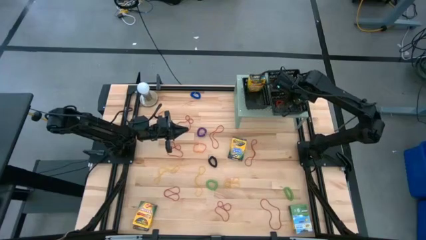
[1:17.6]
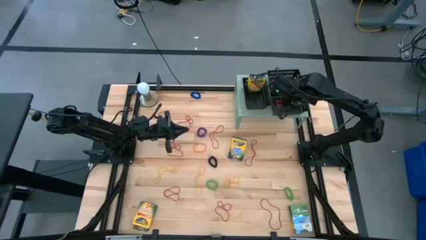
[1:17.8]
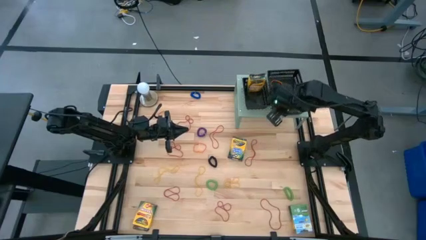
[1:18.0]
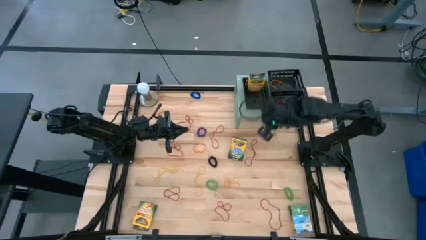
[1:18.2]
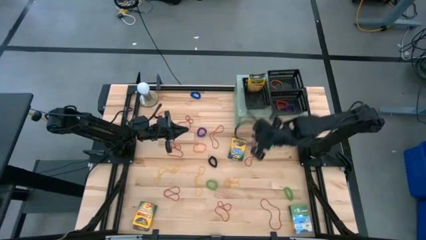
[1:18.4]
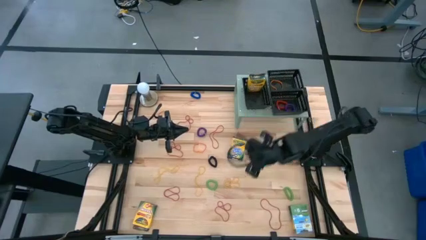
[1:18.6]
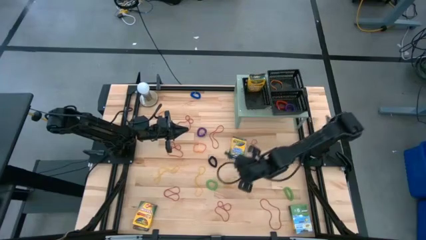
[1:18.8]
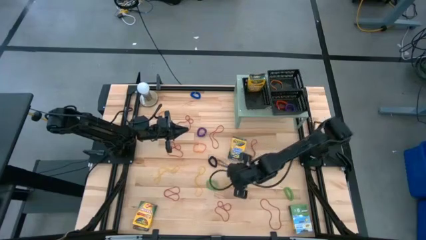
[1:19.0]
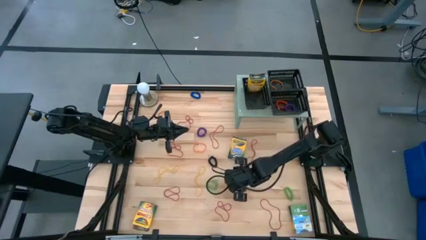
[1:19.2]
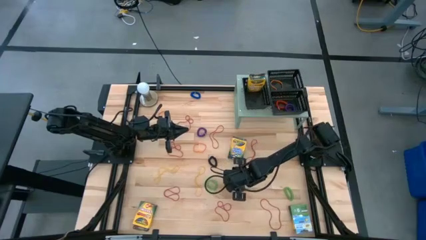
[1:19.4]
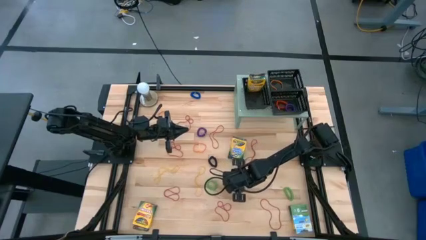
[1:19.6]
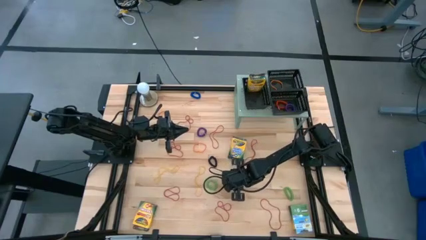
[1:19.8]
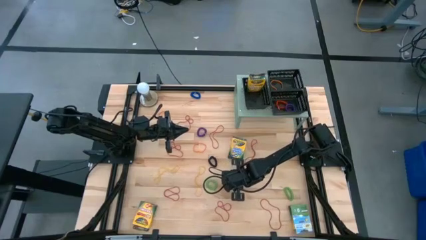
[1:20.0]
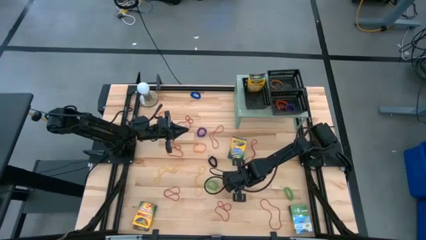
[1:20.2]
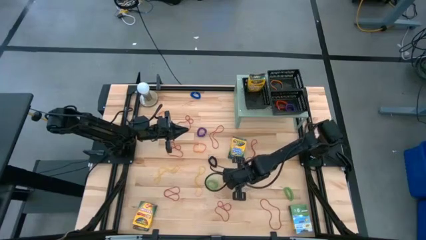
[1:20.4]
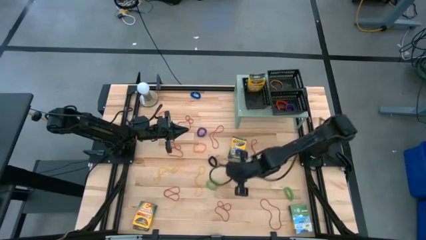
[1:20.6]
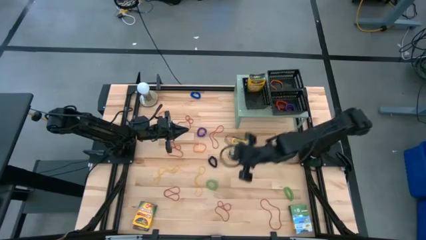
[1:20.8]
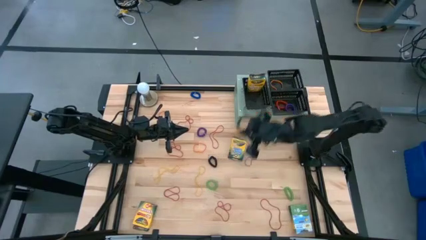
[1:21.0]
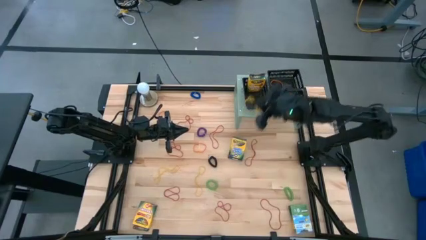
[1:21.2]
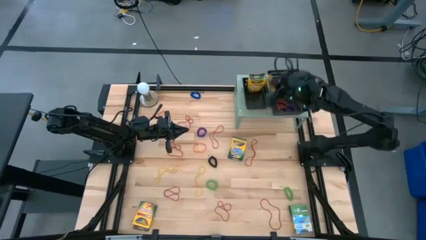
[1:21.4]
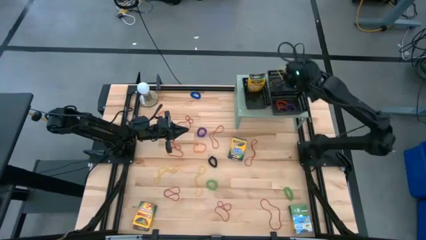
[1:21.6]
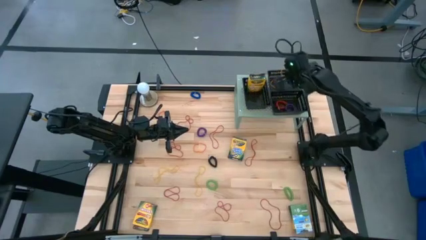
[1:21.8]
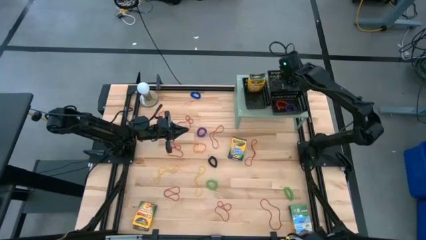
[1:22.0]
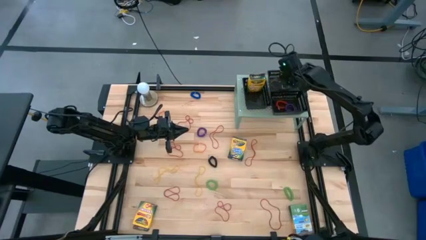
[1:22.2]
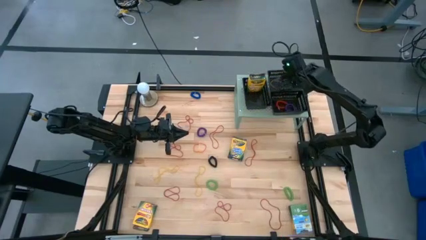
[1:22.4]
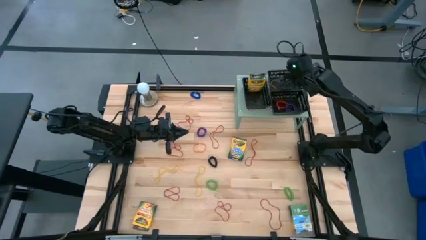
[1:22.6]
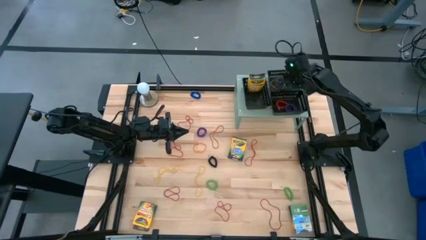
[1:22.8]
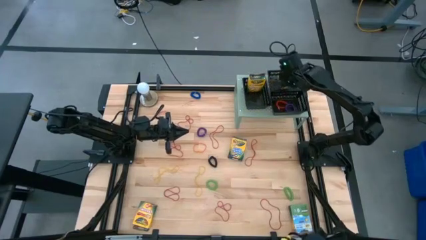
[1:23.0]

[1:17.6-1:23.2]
Task: Pick & Place Office Desk Supplies
Put the right yellow rubber band into the top right black bin on the shelf

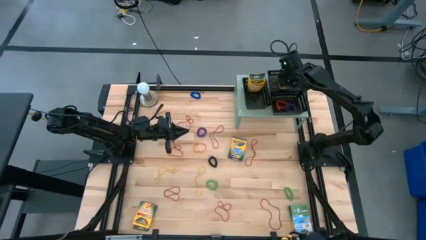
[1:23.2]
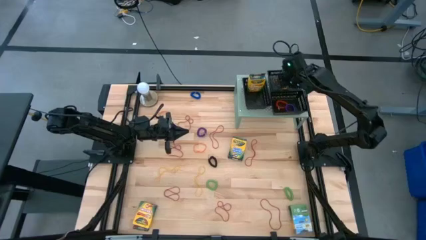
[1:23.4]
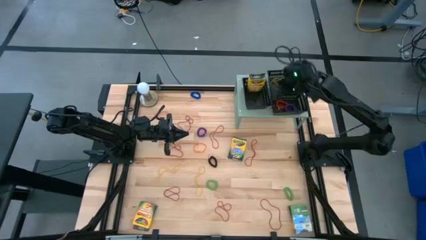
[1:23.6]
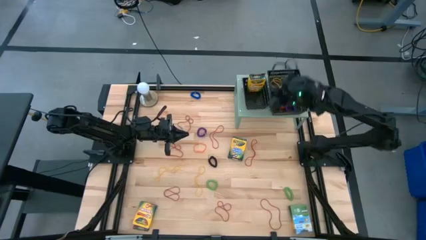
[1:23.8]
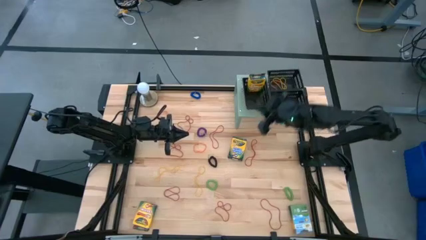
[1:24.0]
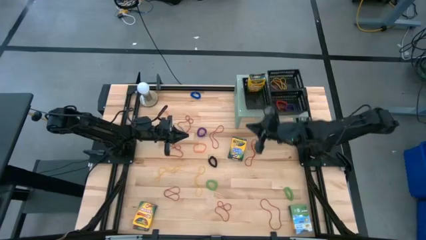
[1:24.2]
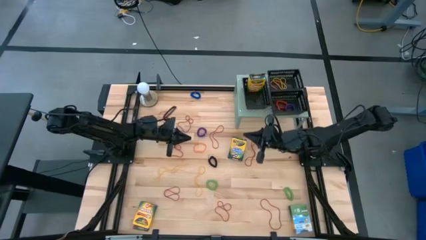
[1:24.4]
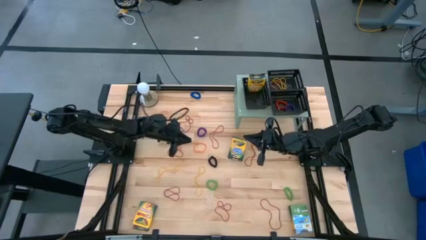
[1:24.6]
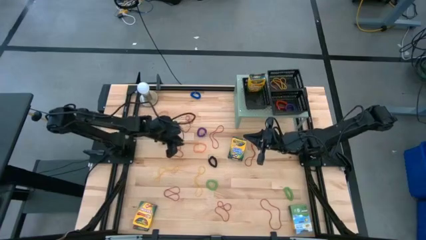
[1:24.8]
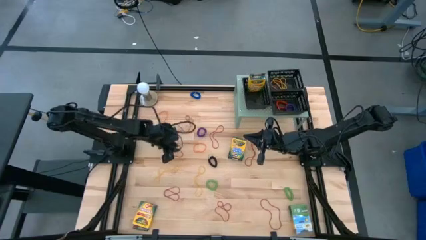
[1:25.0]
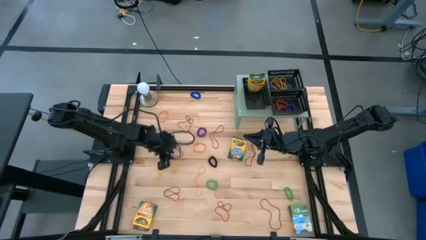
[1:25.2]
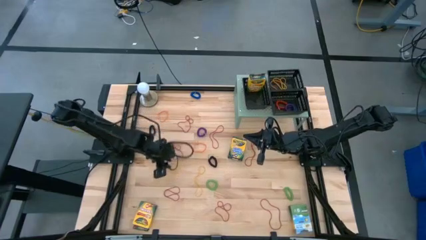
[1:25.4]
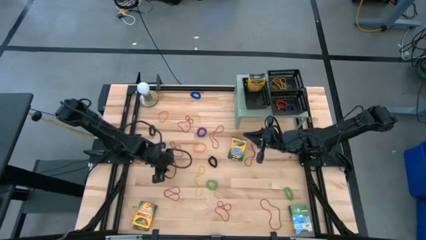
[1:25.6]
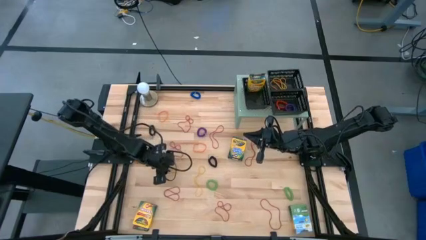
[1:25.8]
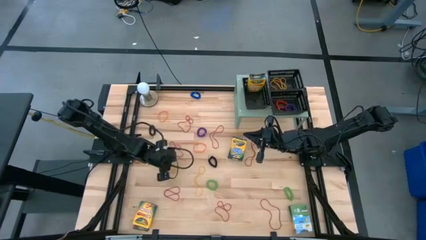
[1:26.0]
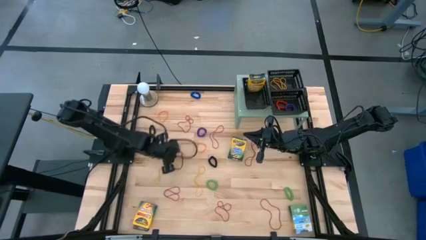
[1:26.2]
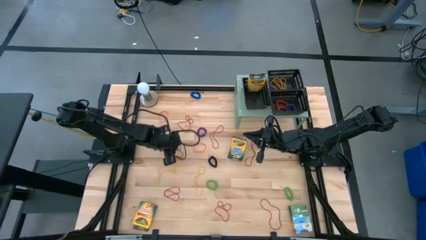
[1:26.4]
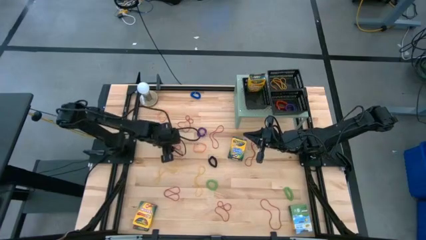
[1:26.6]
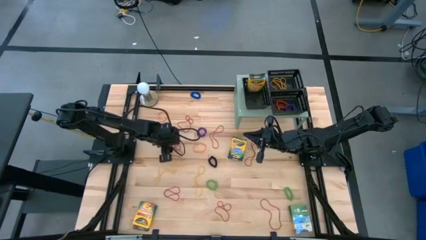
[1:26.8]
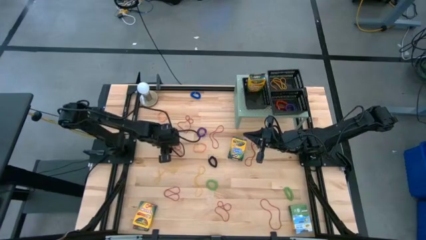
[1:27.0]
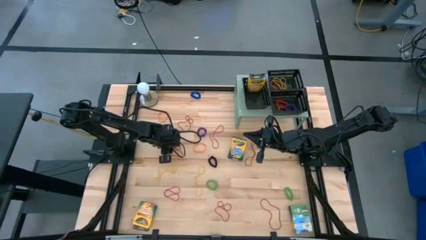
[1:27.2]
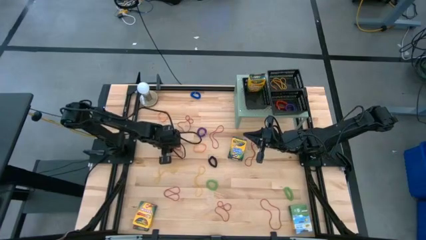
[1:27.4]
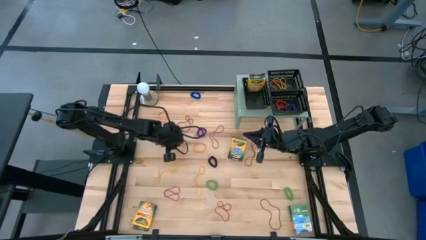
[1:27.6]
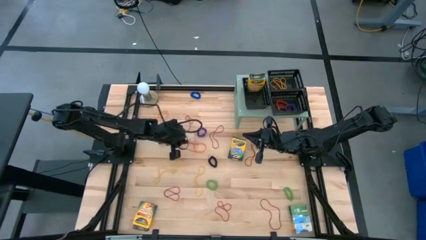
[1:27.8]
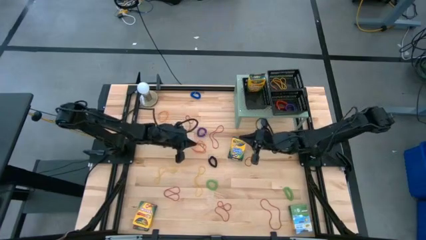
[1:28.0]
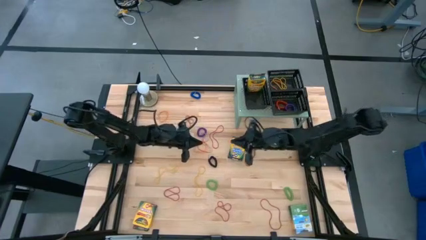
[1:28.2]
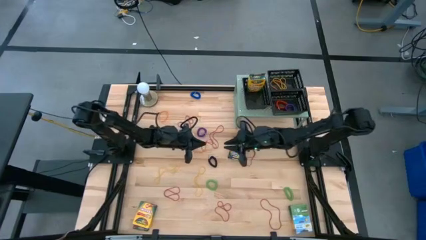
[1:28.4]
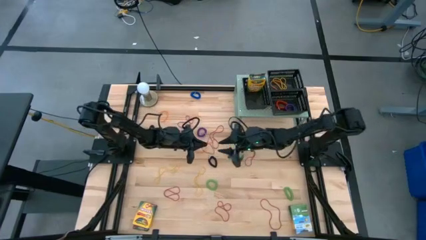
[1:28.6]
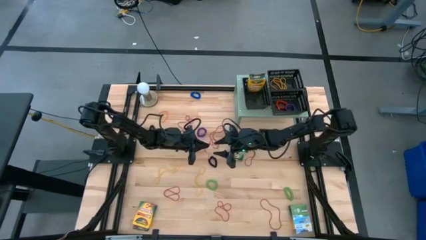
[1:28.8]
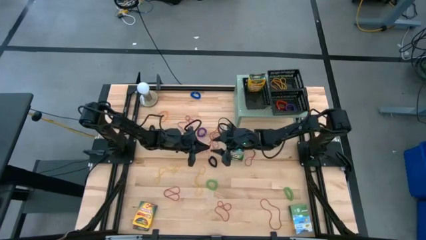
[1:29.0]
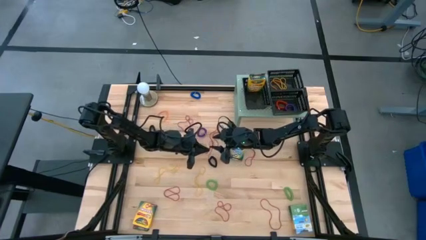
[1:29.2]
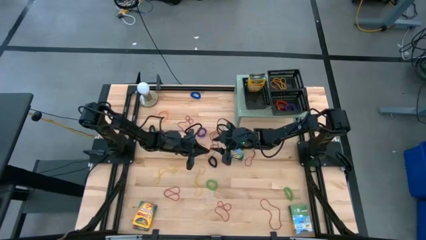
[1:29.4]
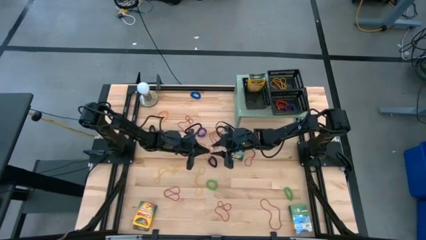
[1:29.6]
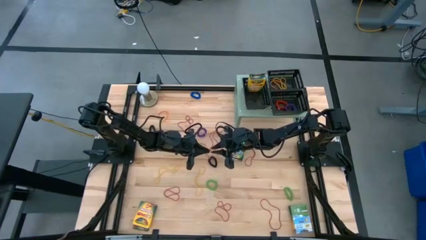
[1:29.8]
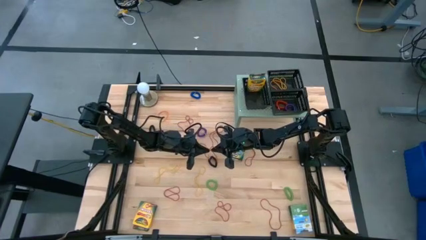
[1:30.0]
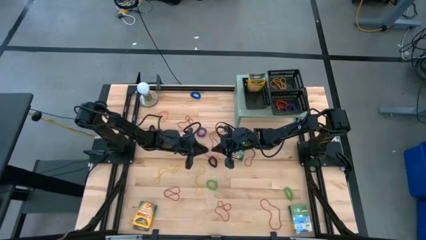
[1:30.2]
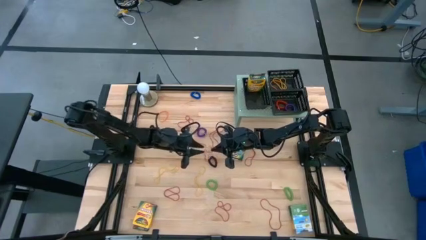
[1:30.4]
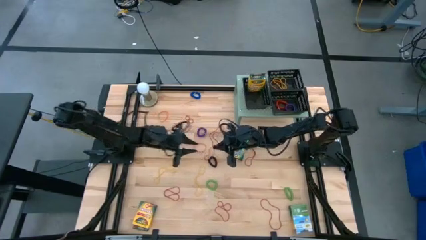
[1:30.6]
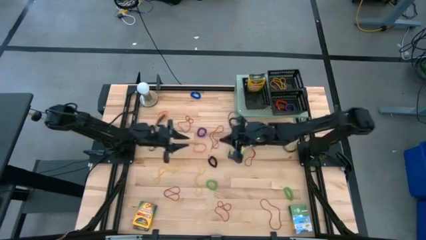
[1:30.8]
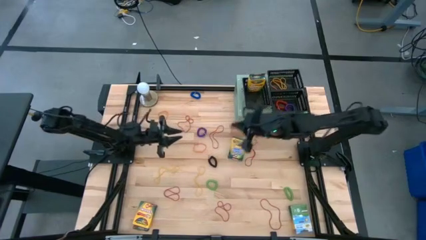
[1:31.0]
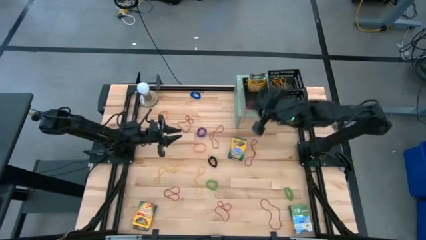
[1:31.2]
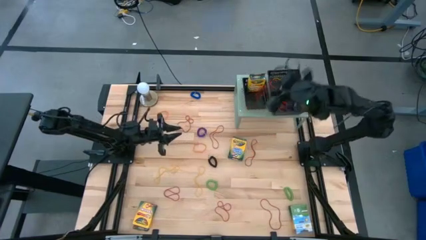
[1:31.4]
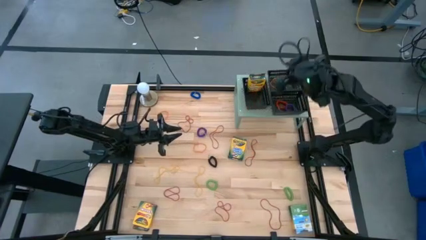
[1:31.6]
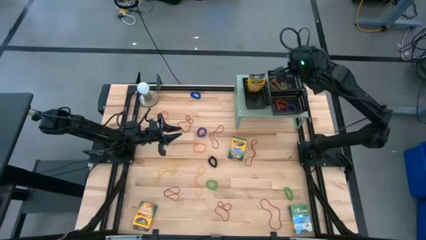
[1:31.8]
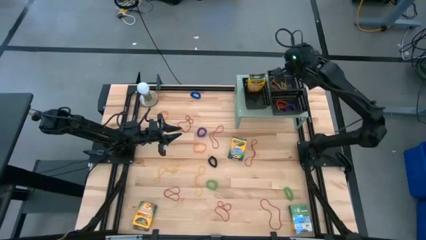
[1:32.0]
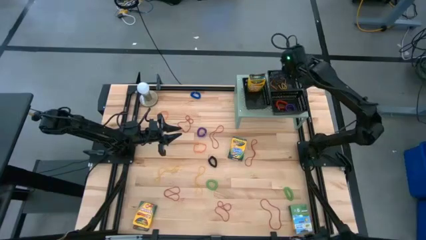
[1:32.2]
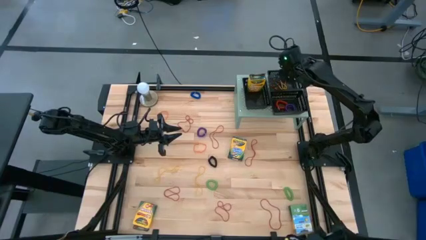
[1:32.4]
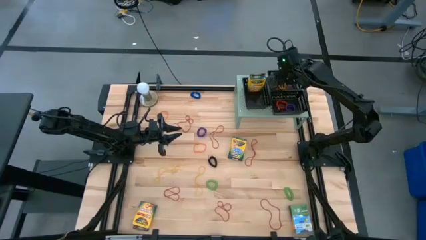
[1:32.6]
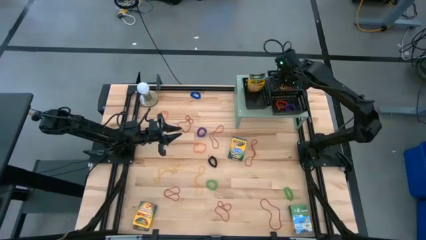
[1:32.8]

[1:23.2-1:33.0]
Put the red rubber band into the top right black bin on the shelf

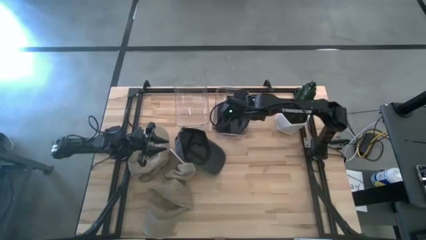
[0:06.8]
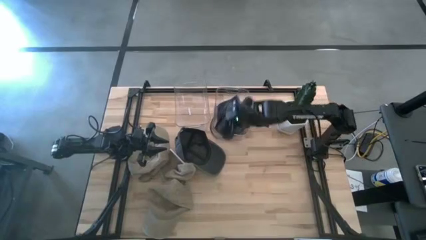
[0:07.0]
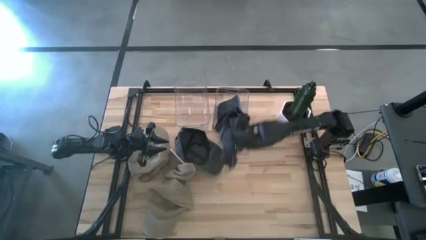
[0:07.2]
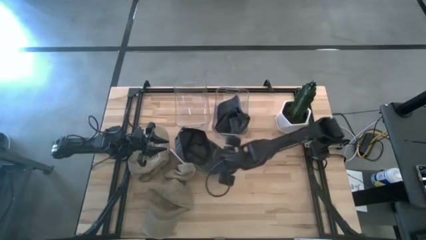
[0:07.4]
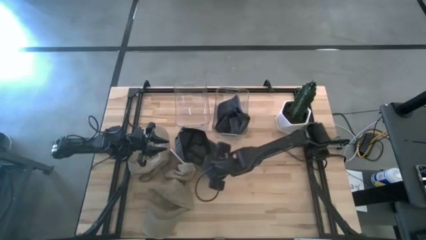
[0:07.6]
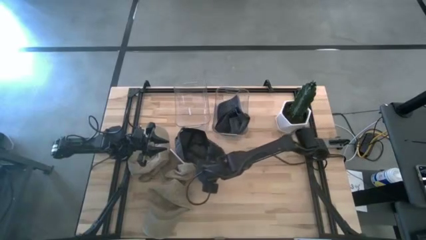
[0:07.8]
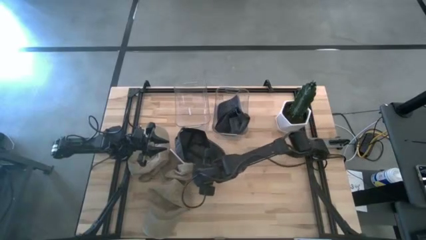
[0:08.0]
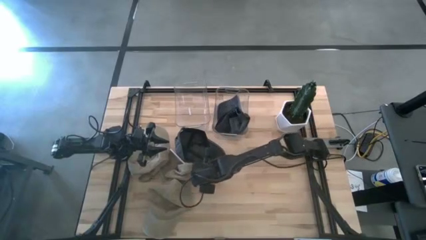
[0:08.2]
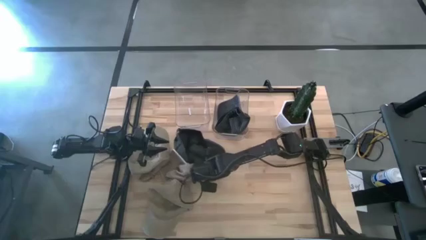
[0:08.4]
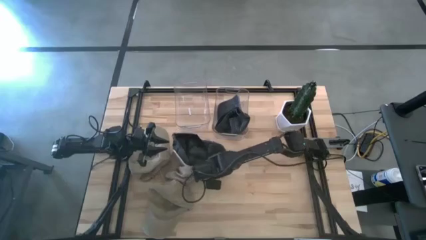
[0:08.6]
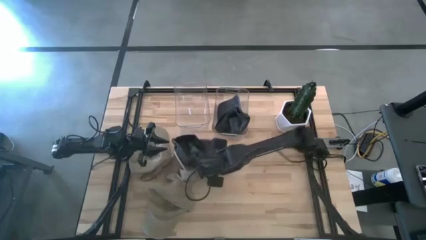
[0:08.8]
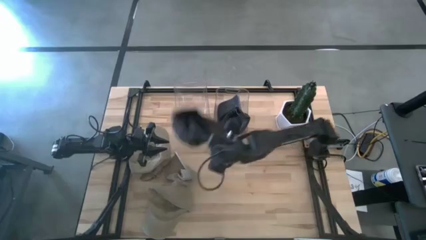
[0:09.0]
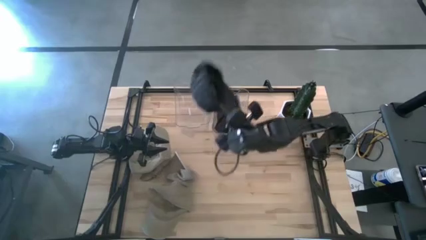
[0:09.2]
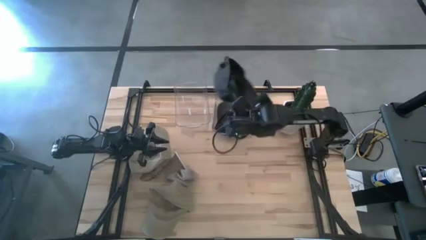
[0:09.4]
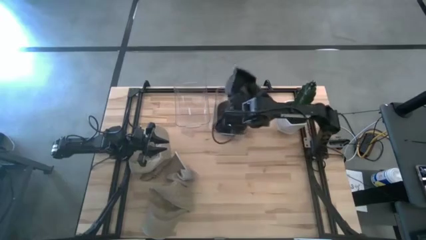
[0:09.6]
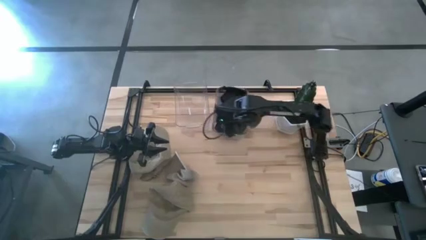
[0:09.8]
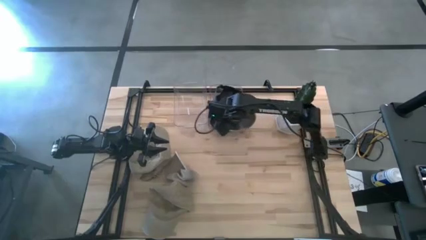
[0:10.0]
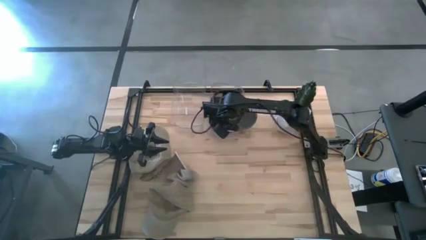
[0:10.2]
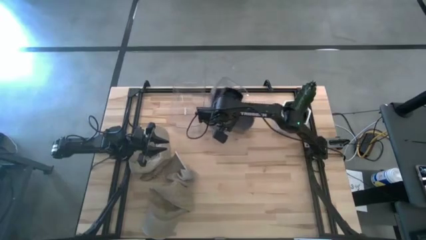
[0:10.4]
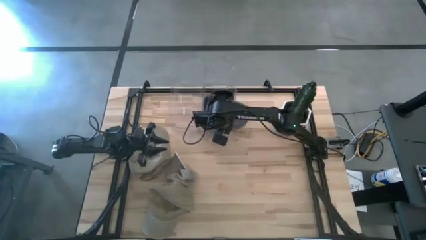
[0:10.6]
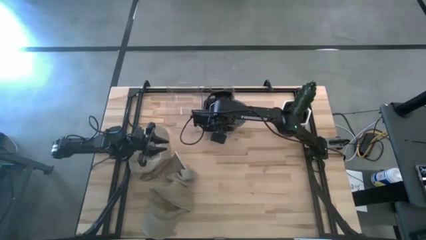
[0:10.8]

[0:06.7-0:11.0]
Task: Pick & Place hat
Put the black cap into the right transparent bin
